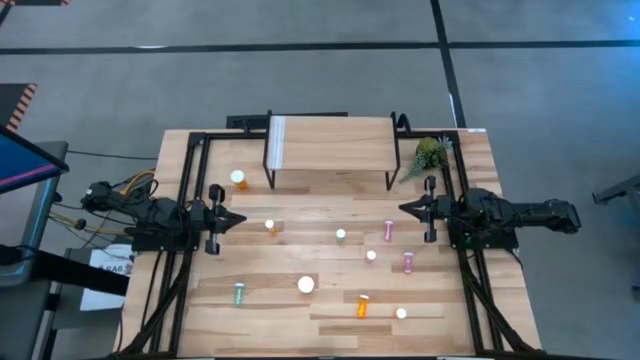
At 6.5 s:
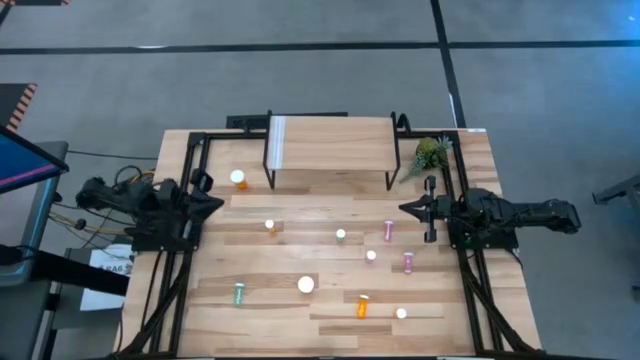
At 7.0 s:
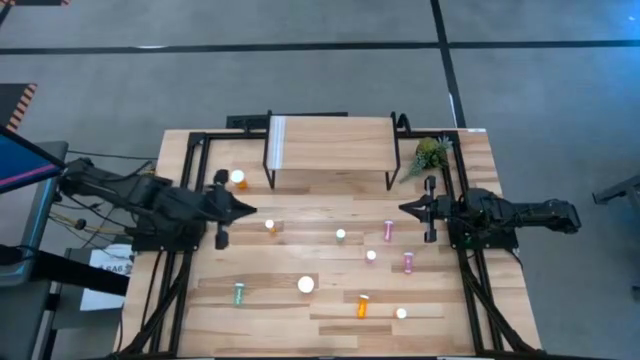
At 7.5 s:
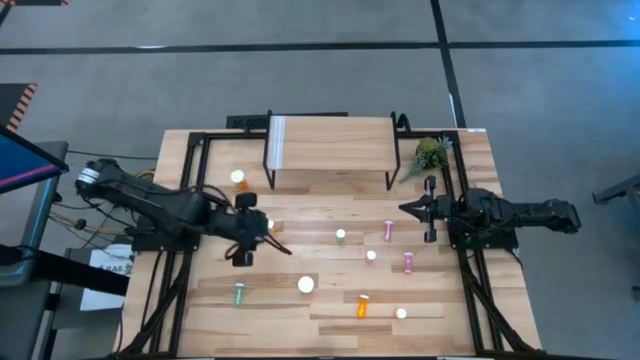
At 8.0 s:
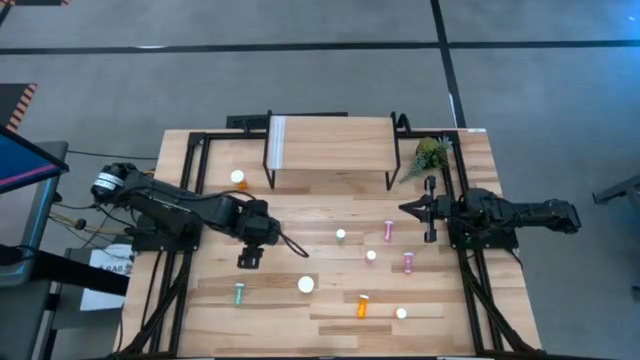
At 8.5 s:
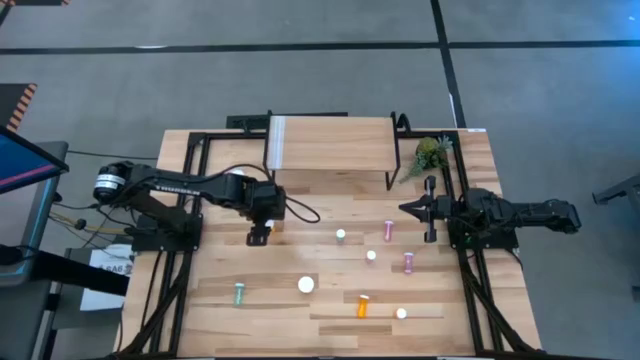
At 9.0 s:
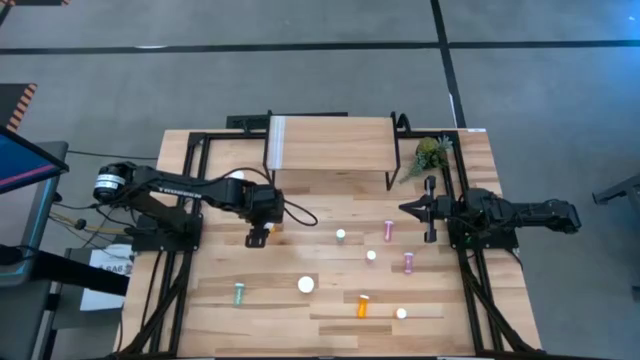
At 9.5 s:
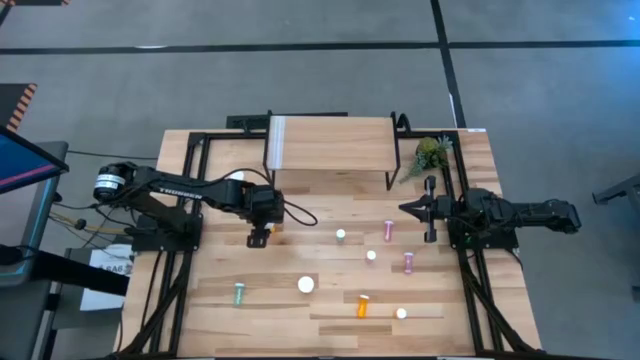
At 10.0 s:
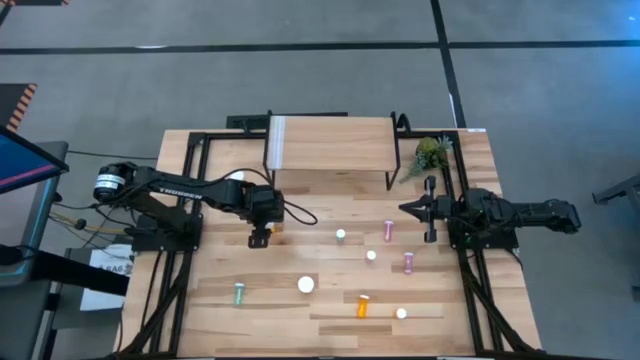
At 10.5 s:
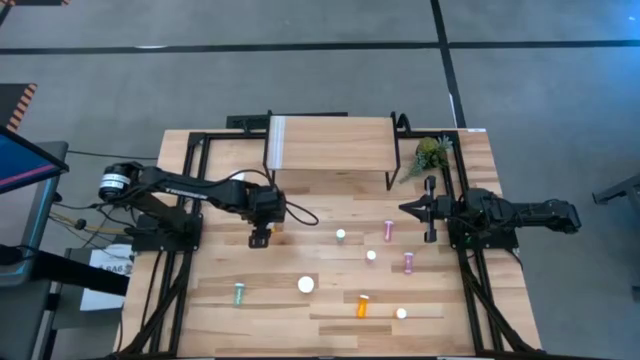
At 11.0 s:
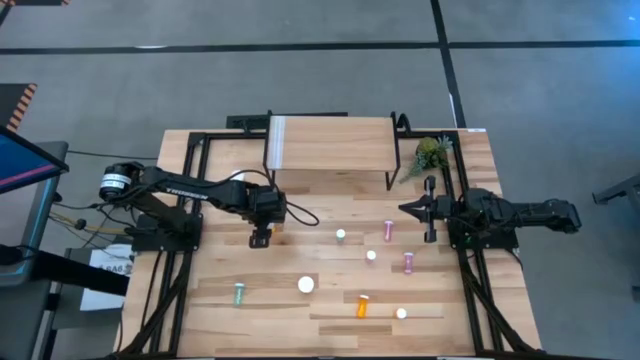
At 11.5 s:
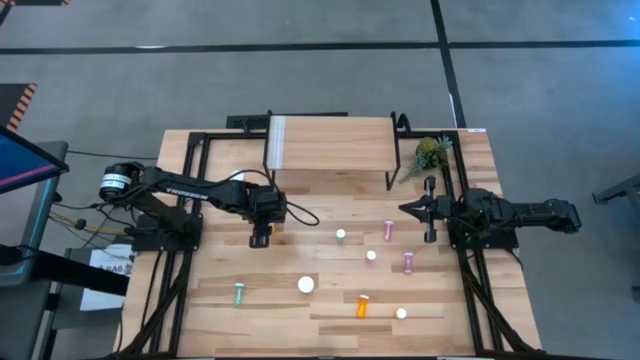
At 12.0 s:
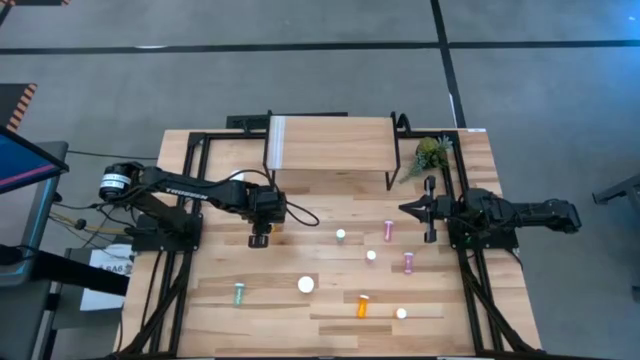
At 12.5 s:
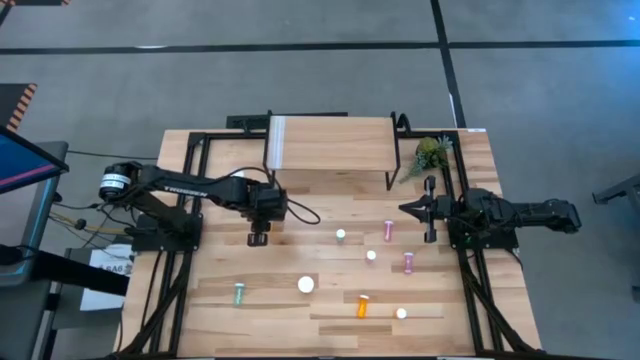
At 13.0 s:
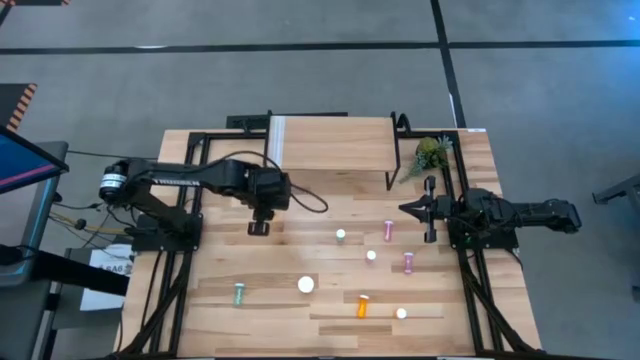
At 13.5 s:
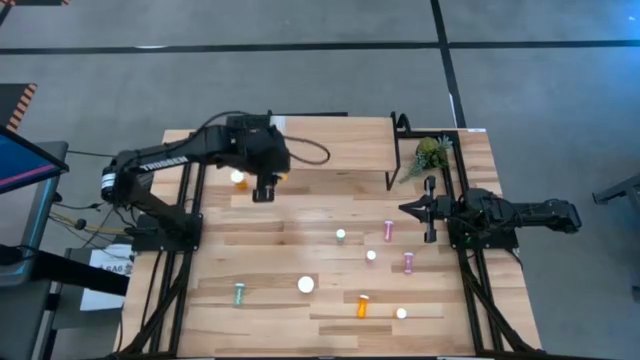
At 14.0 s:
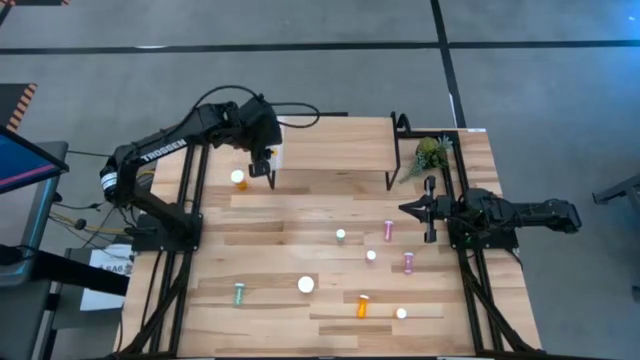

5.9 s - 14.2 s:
Task: Pick and place medicine bottles onto shelf by color
Put the top small orange pill bottle on the shelf

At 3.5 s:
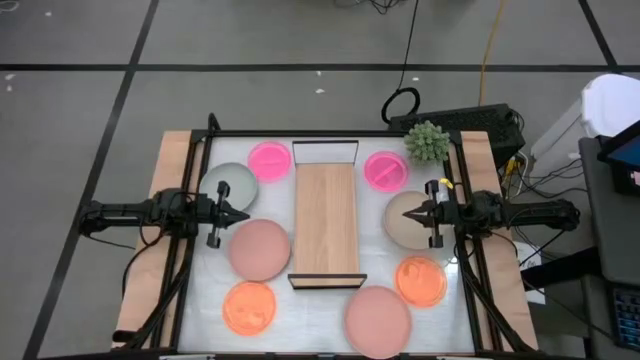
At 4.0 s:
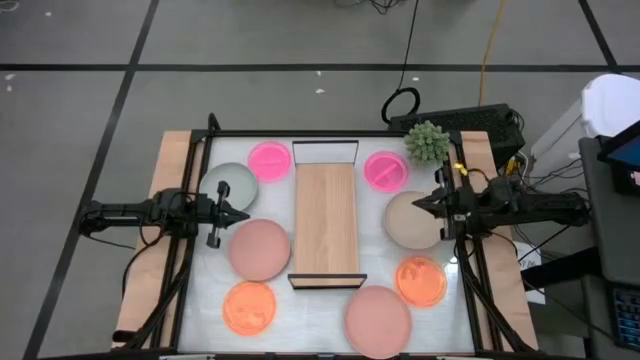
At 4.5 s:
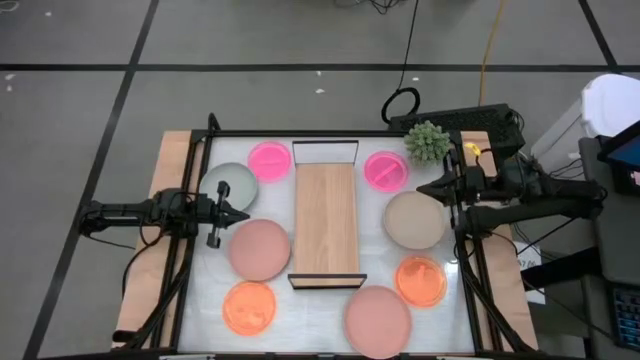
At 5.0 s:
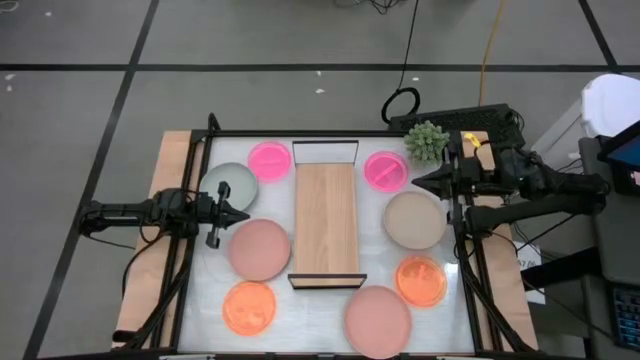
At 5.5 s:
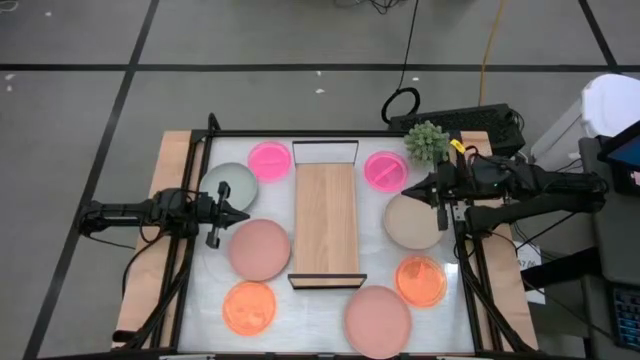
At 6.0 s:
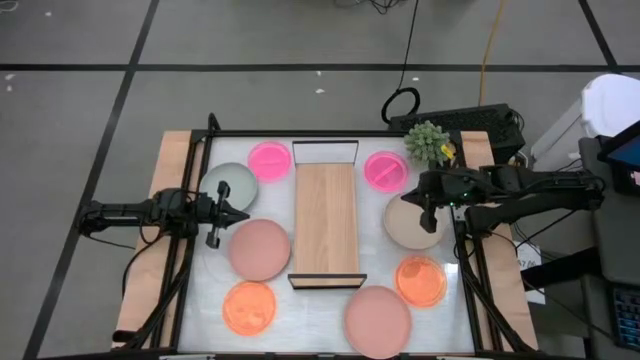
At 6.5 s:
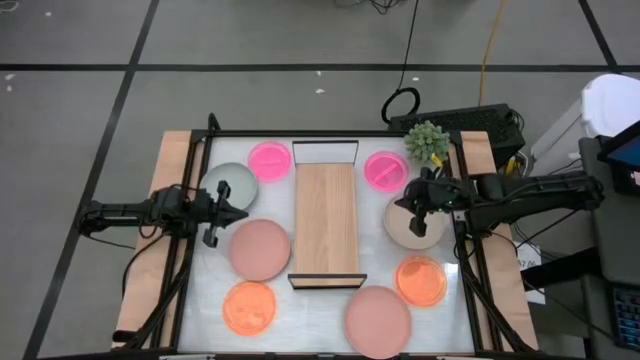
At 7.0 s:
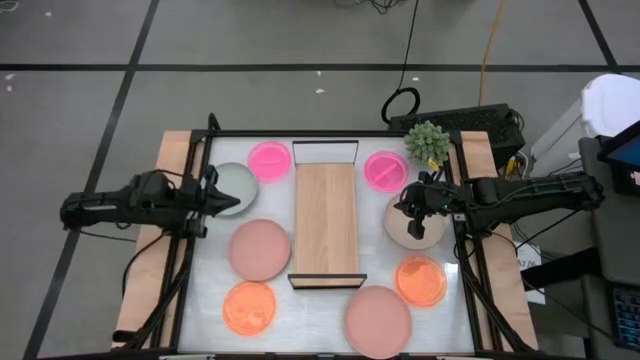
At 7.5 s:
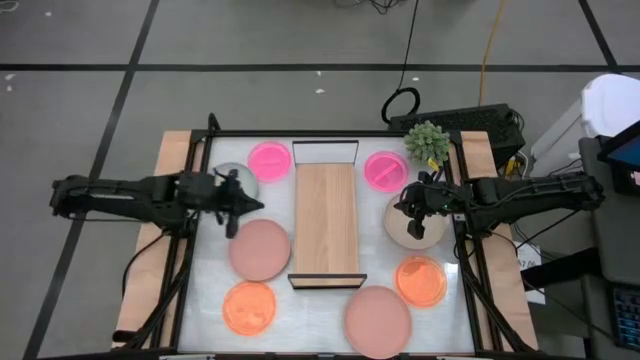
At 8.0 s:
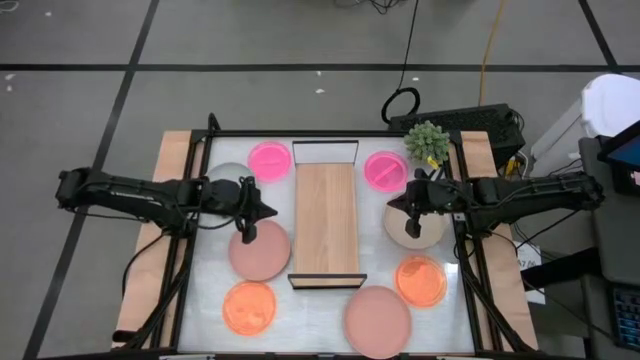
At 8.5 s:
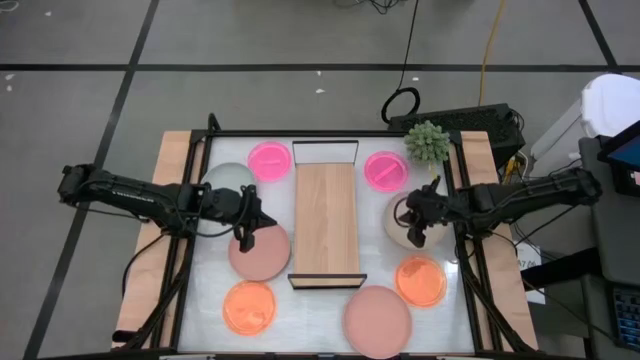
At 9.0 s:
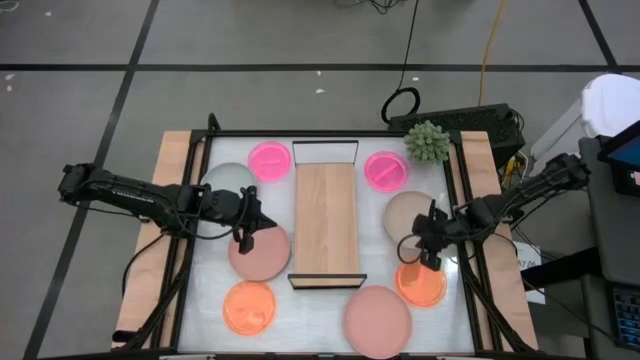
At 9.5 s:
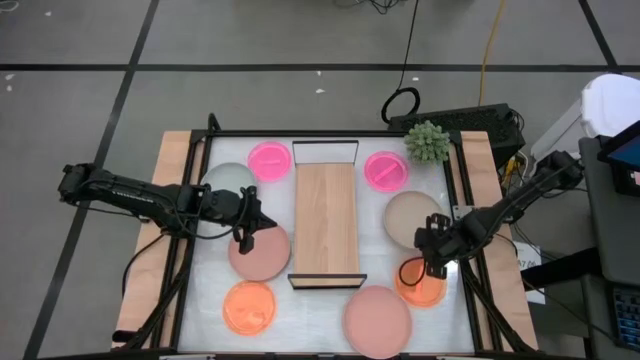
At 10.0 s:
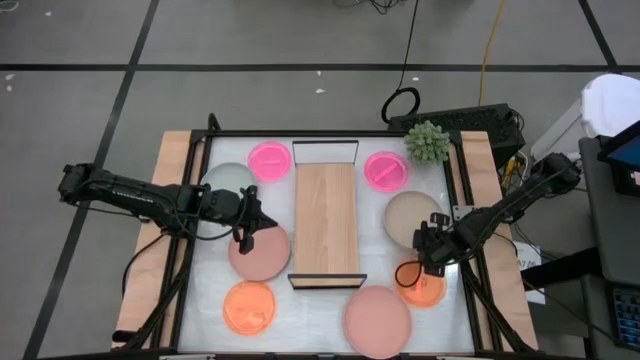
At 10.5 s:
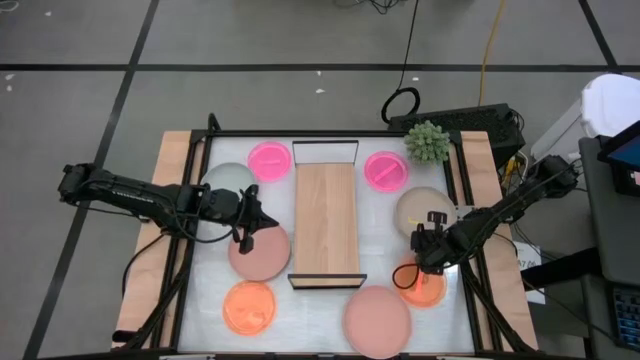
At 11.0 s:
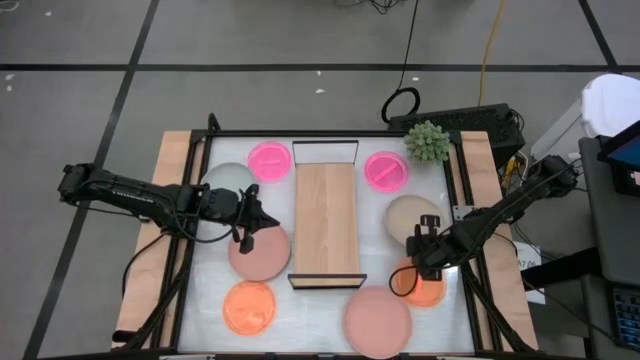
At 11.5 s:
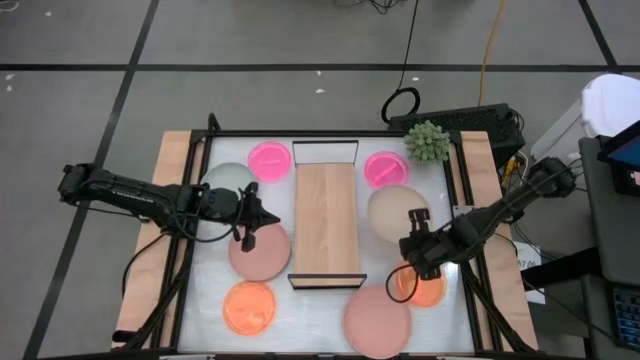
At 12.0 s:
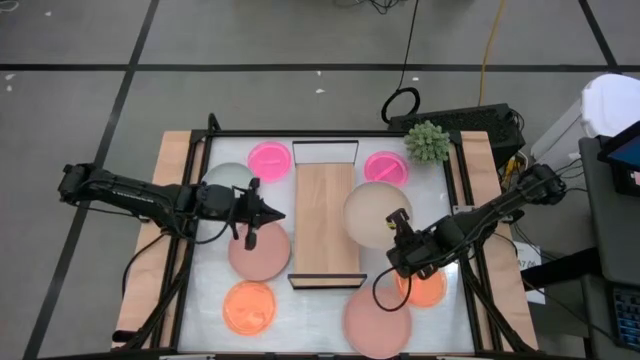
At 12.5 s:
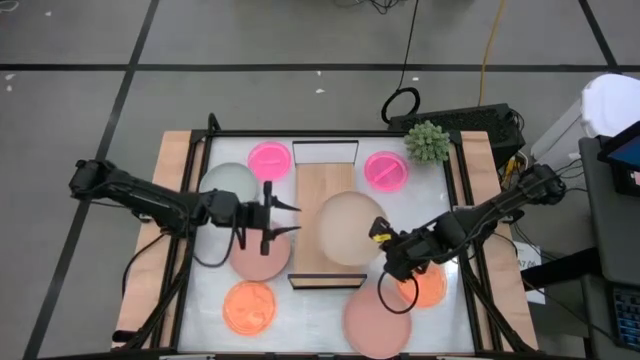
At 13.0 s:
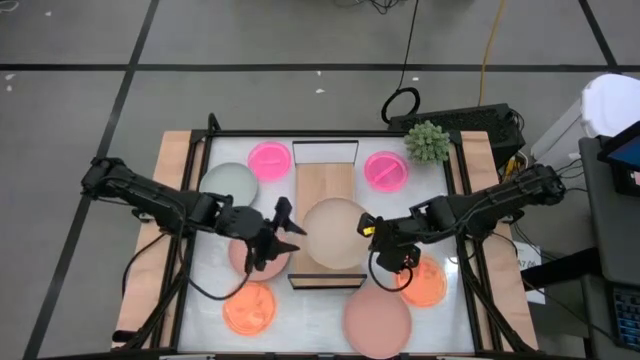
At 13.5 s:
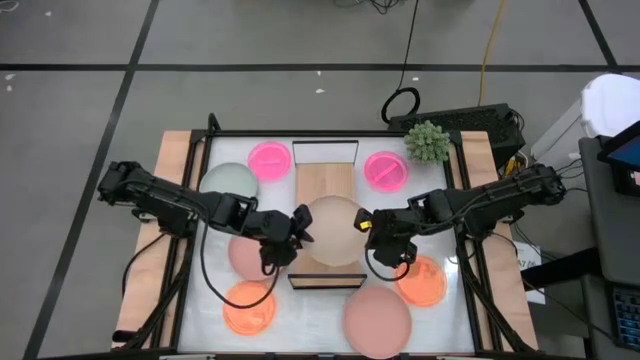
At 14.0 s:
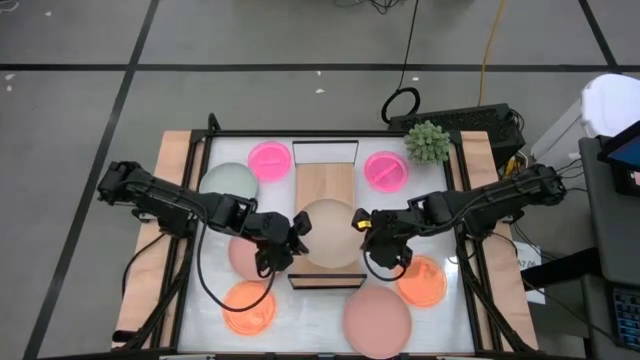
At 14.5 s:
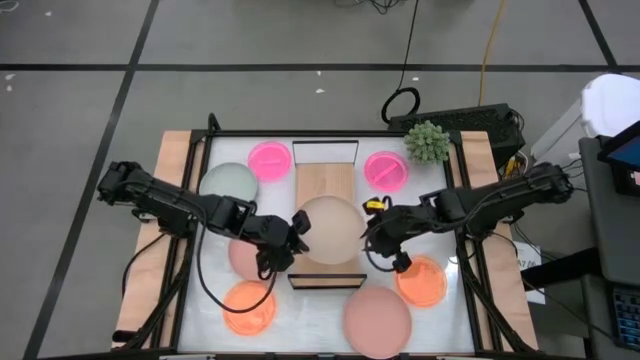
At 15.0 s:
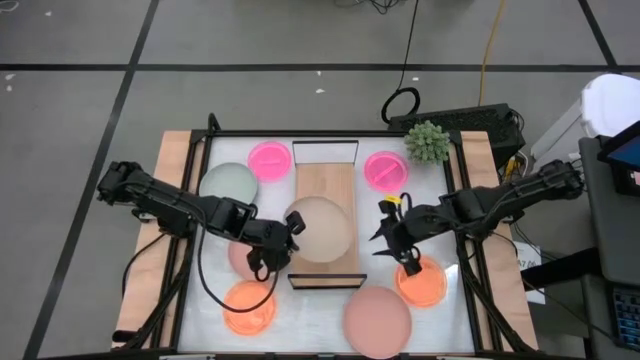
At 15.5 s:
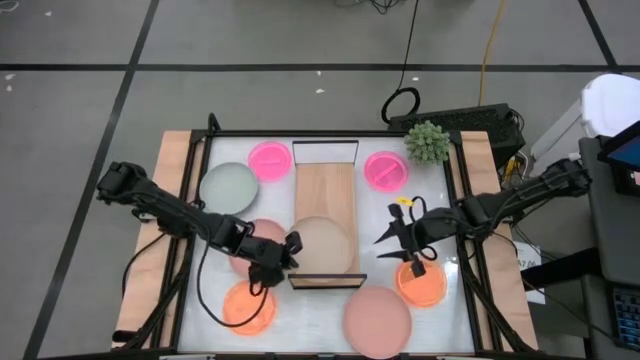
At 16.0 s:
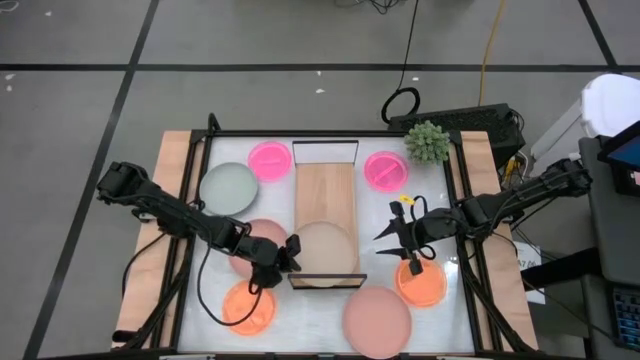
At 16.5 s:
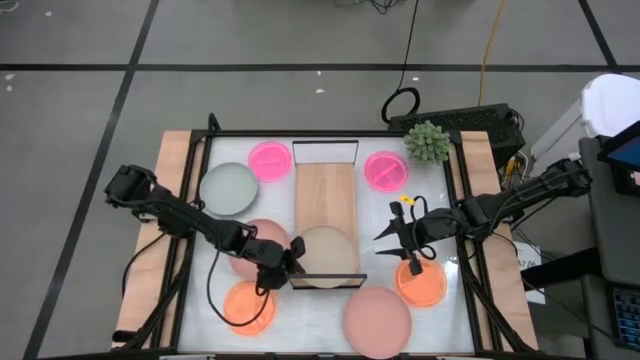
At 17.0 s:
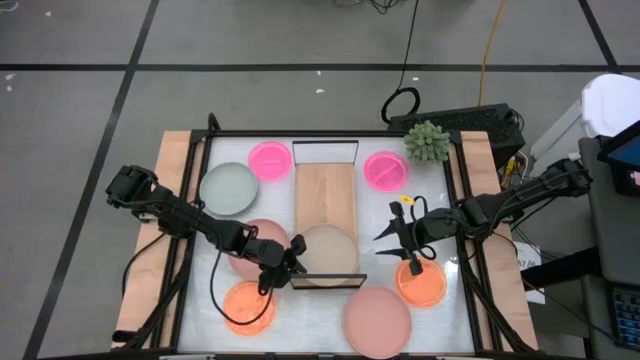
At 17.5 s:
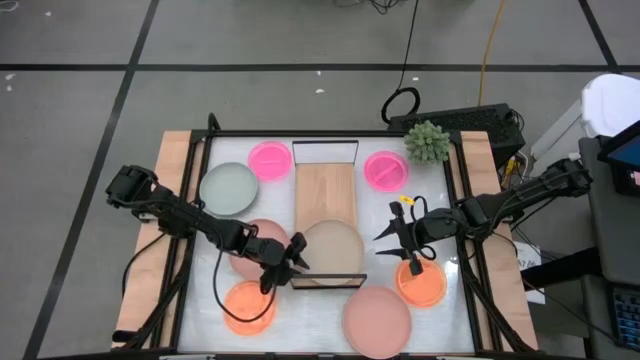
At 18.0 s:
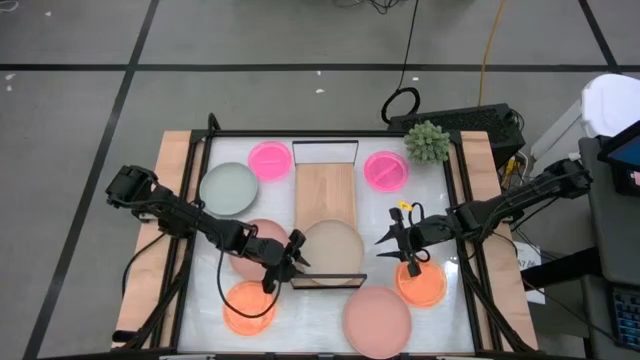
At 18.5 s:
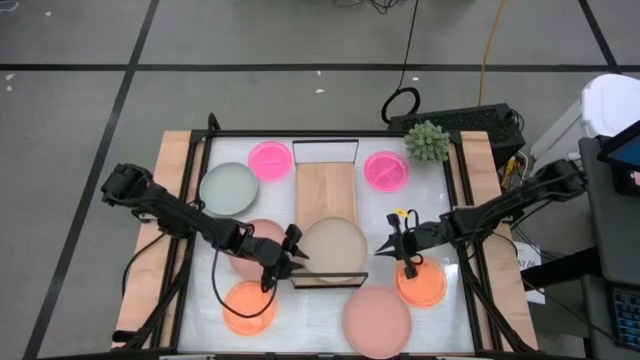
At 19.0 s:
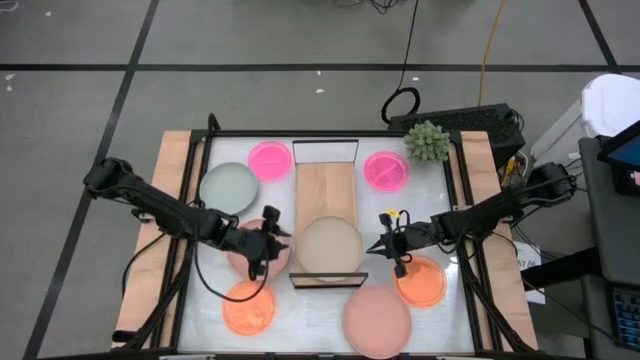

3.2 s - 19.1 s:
Task: Place and stack plates onto a shelf
Put the brown plate on the shelf
